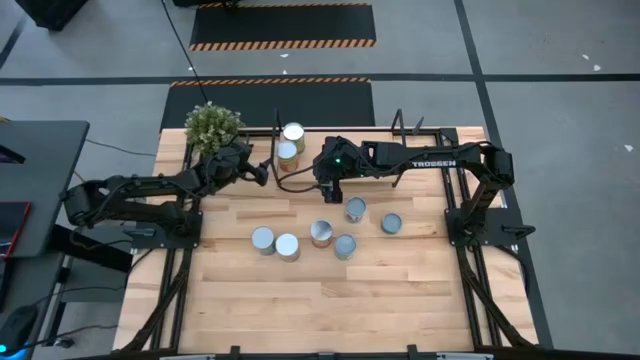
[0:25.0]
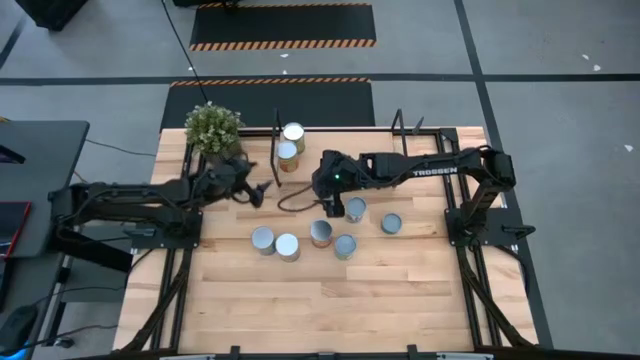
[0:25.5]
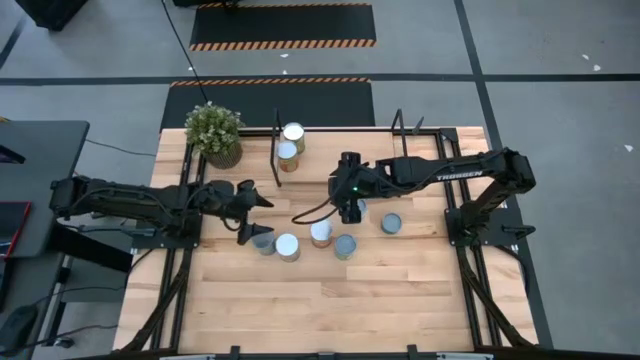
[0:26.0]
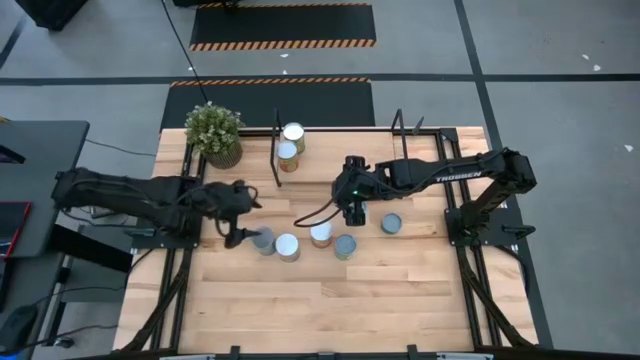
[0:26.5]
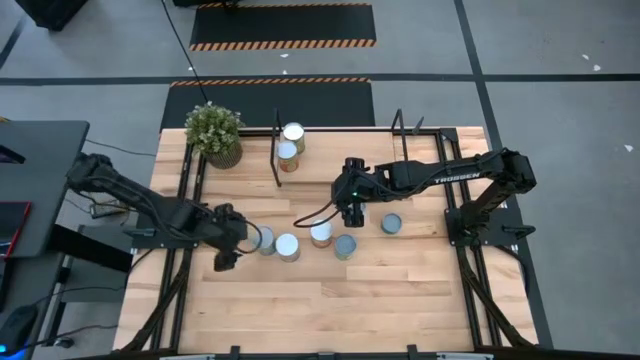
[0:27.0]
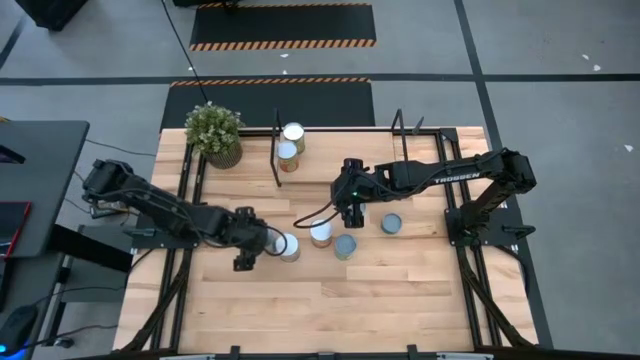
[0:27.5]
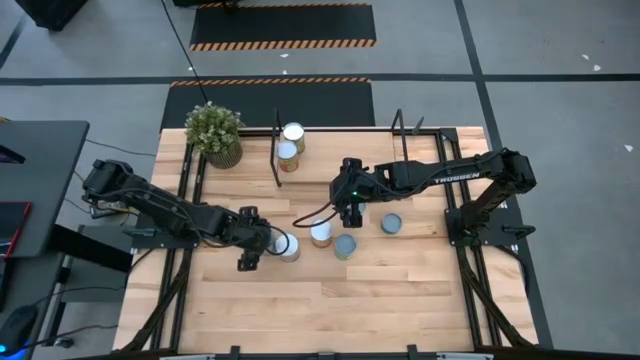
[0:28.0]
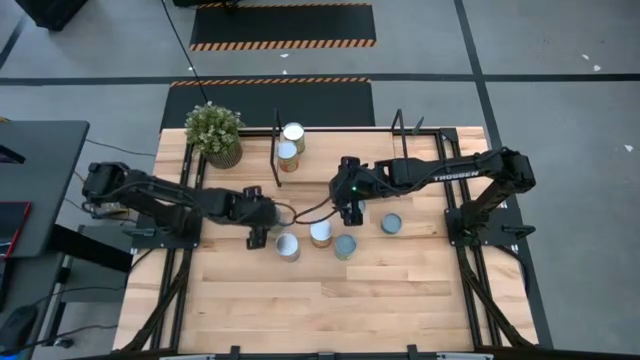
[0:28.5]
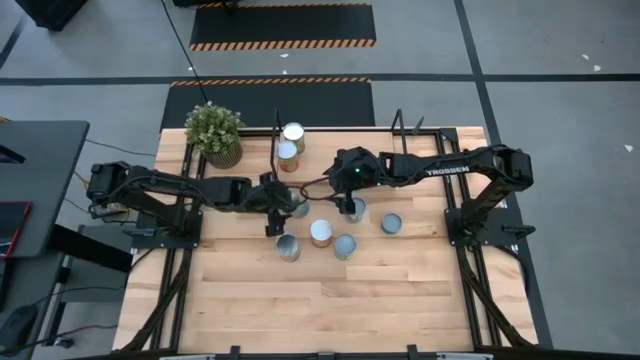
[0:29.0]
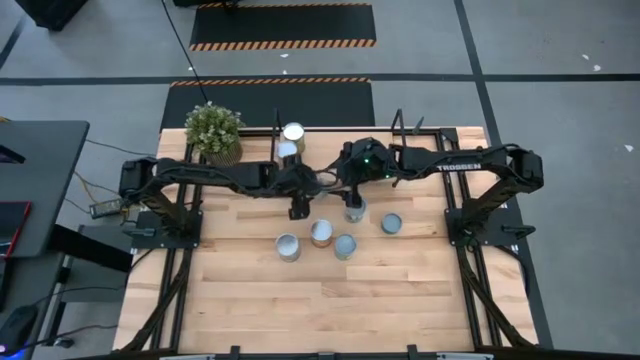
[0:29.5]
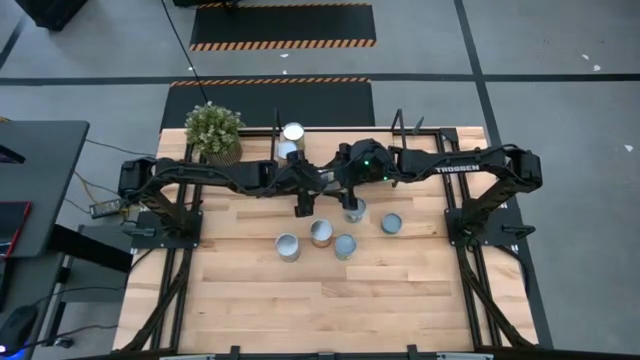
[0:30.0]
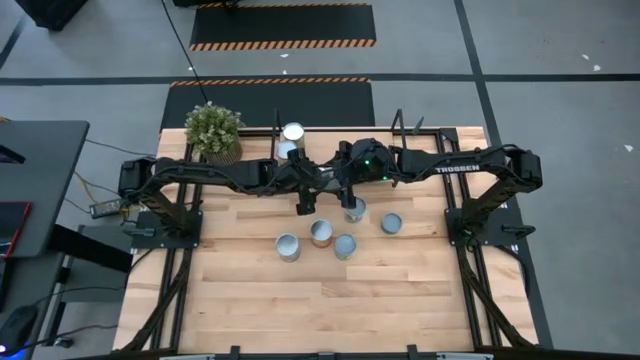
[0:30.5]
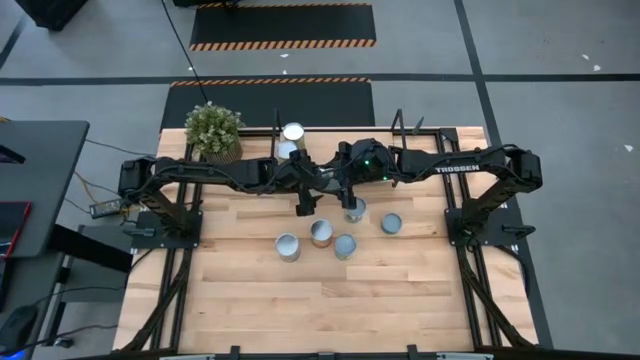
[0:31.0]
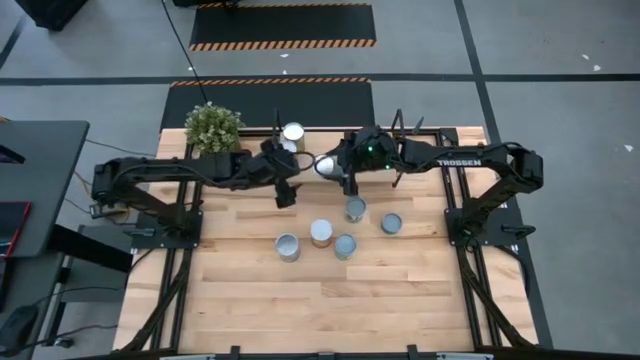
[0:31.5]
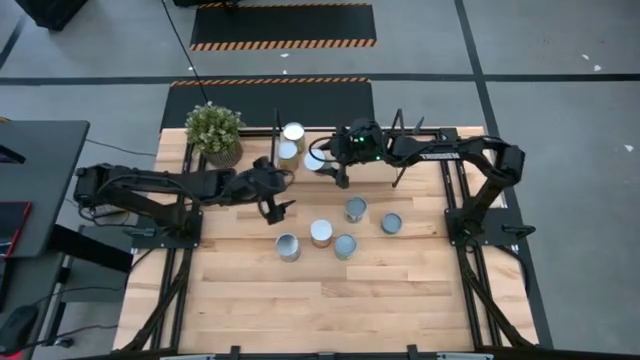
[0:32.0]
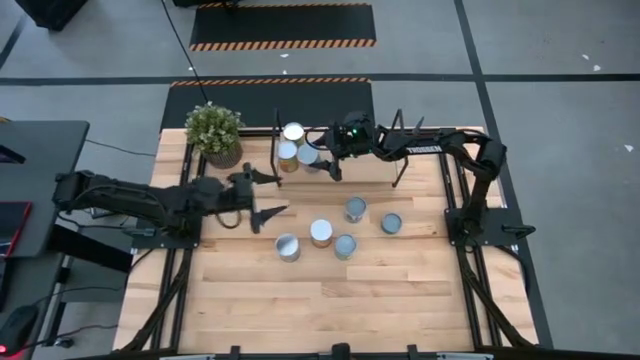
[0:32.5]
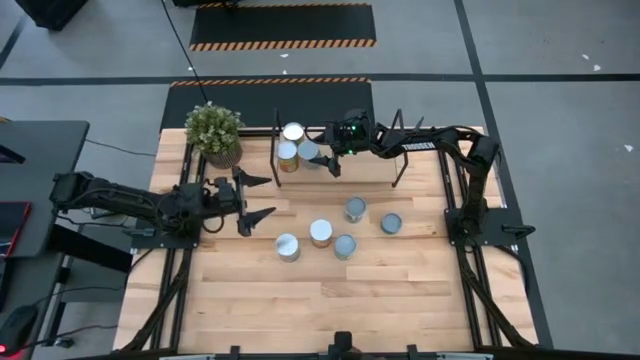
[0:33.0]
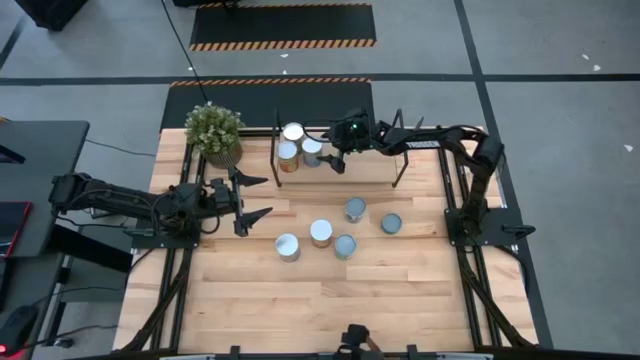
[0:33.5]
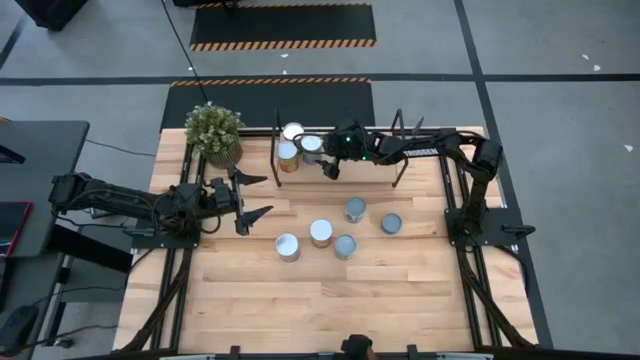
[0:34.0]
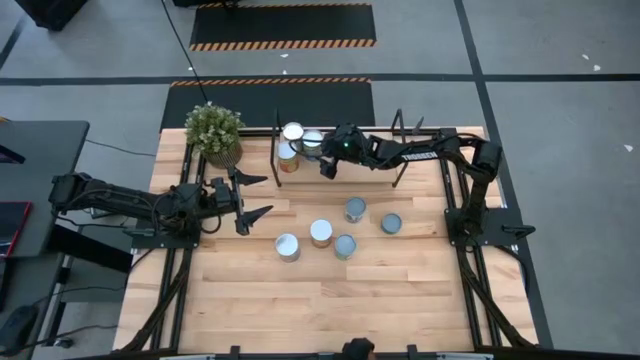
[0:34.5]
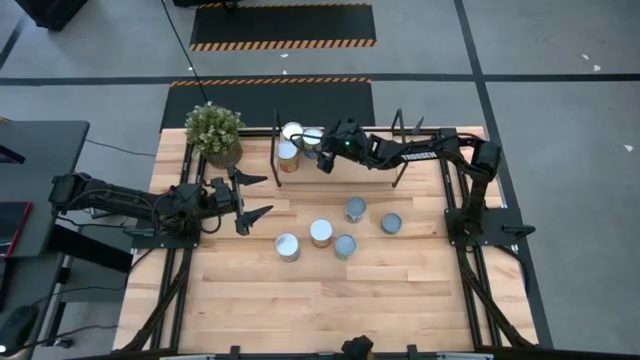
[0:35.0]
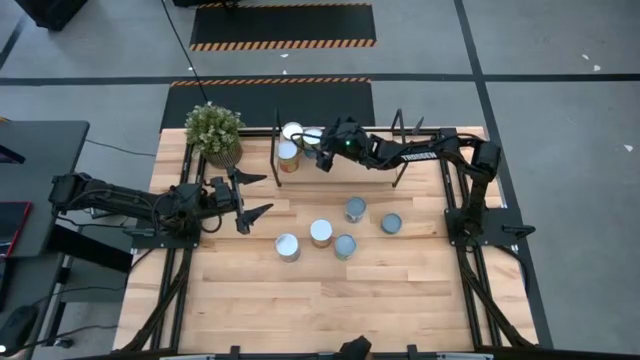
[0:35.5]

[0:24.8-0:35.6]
Task: Pick and place cans onto a shelf
Put the canned cherries on the shelf

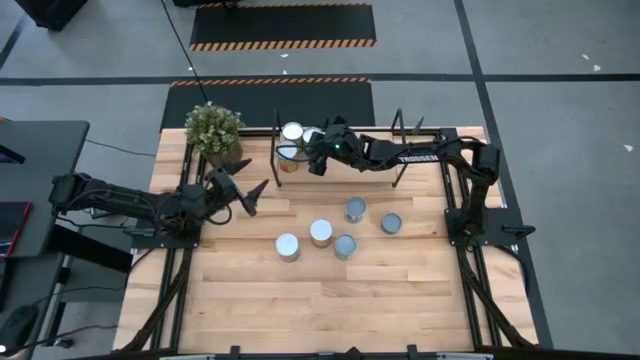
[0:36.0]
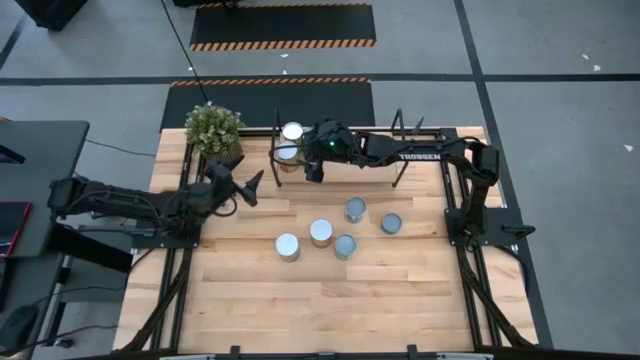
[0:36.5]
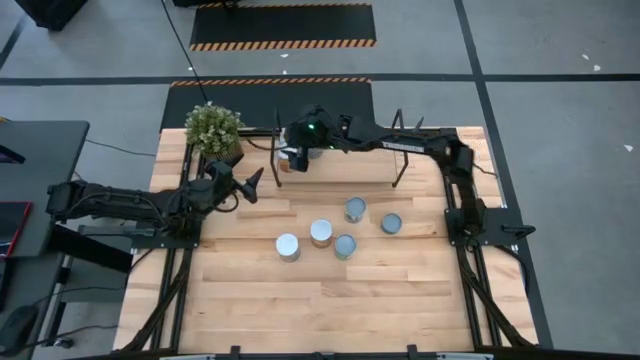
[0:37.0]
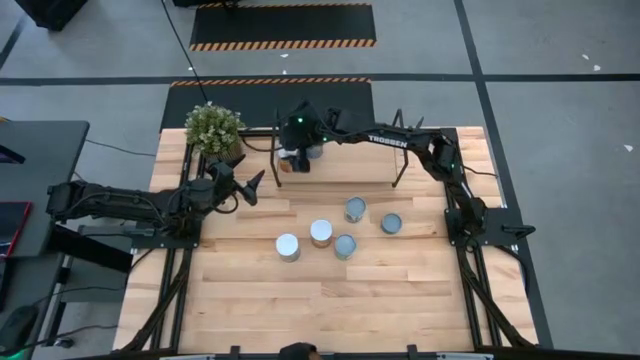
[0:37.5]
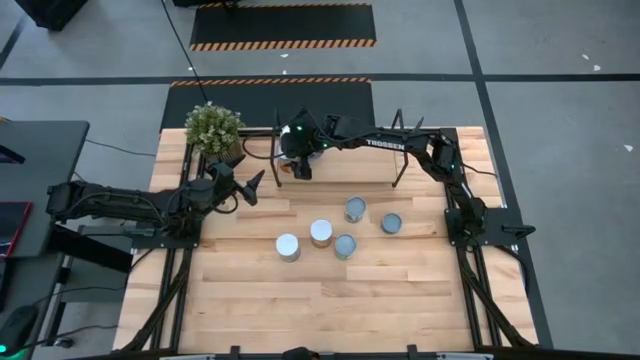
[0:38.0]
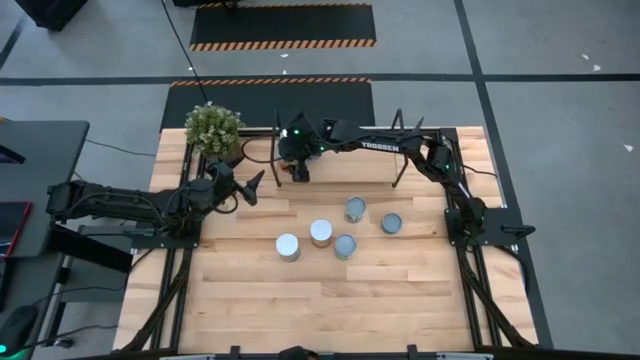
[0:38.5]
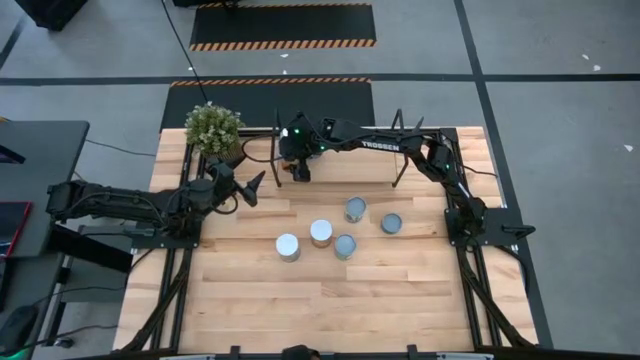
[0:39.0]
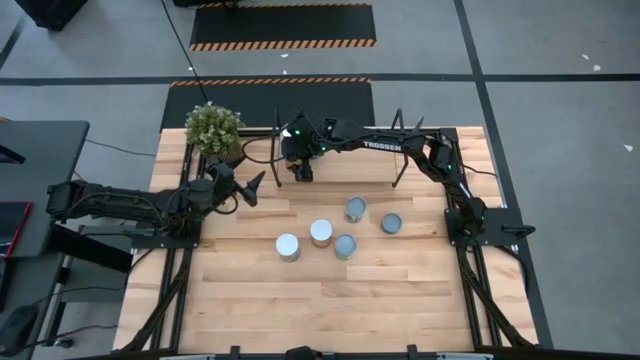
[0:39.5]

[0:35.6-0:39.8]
Adjust the canned pineapple on the shelf

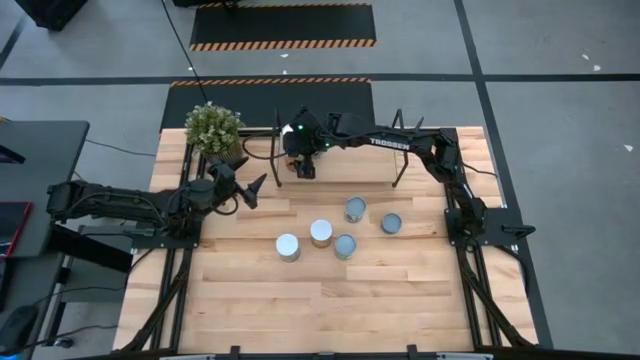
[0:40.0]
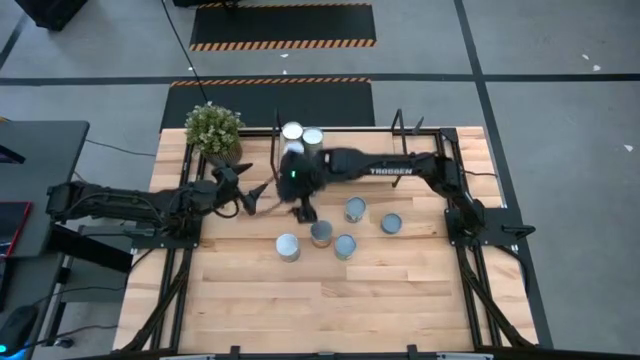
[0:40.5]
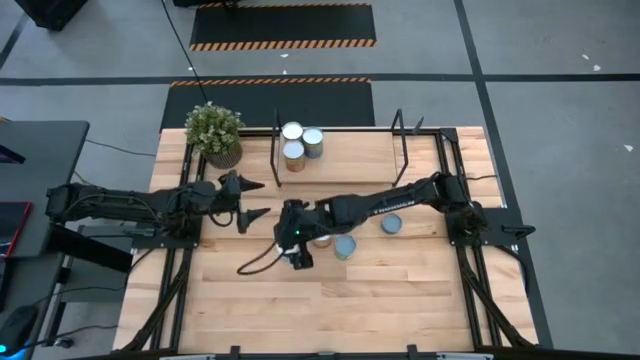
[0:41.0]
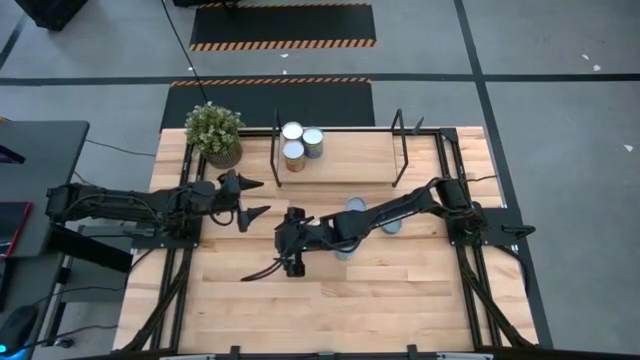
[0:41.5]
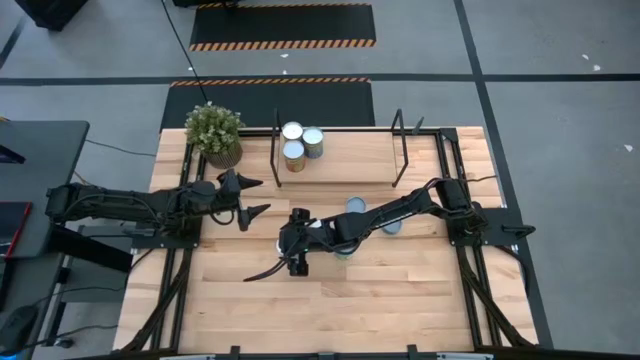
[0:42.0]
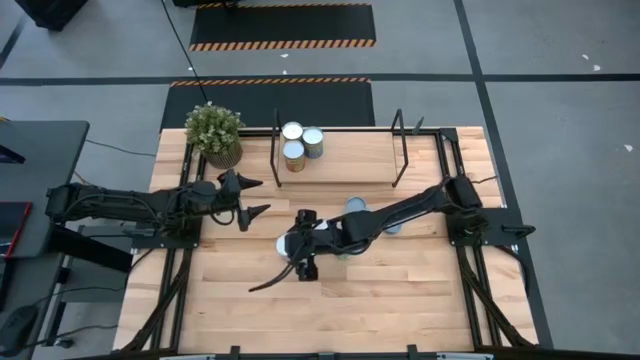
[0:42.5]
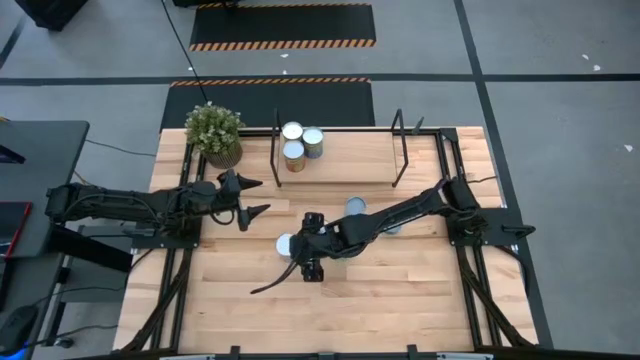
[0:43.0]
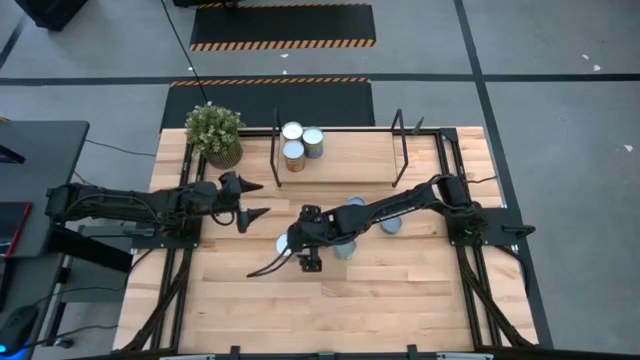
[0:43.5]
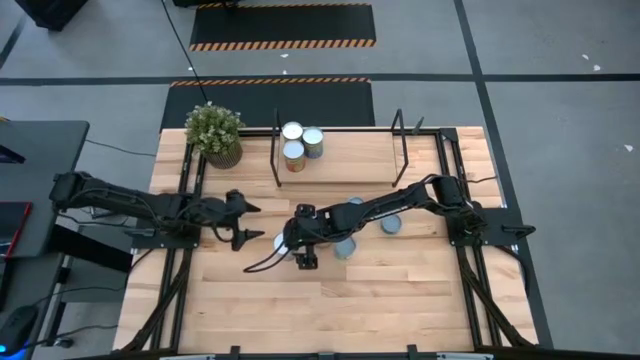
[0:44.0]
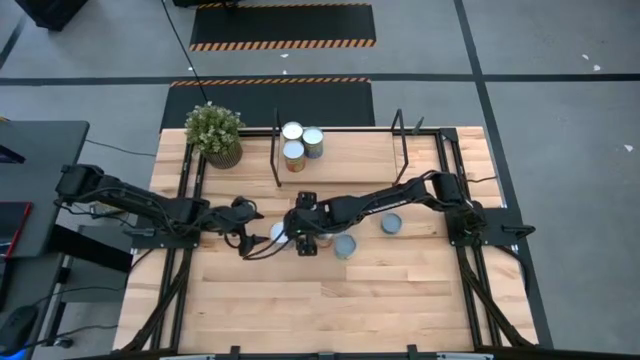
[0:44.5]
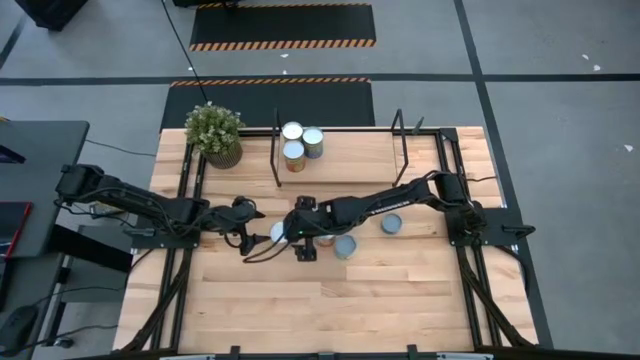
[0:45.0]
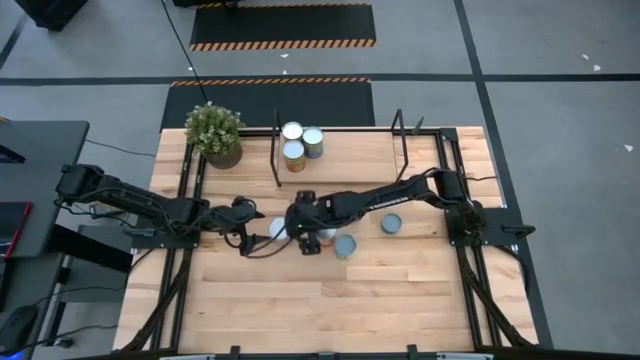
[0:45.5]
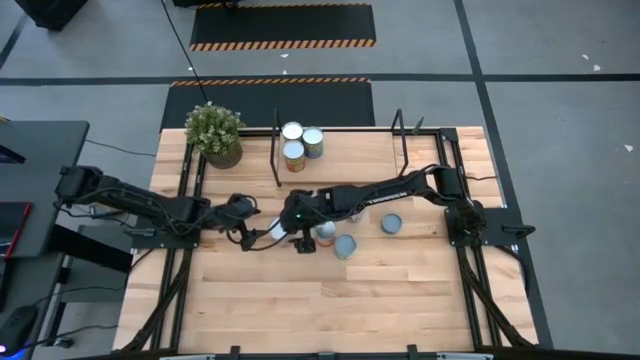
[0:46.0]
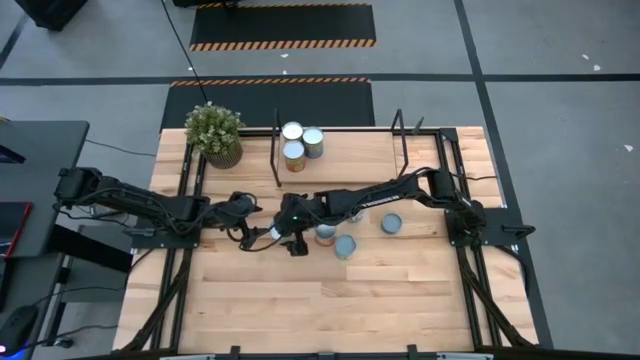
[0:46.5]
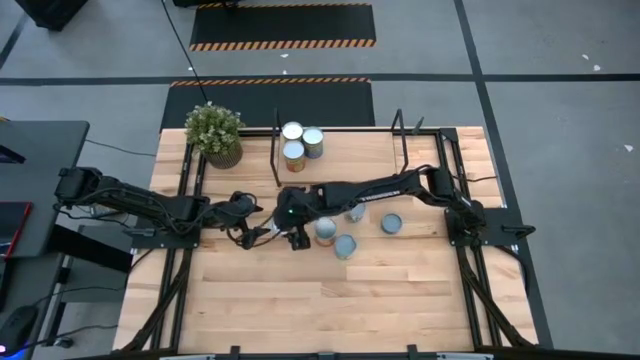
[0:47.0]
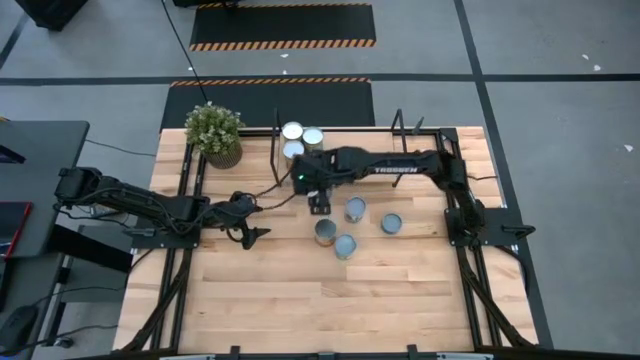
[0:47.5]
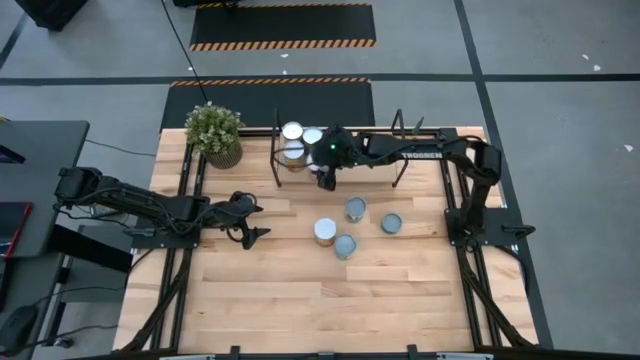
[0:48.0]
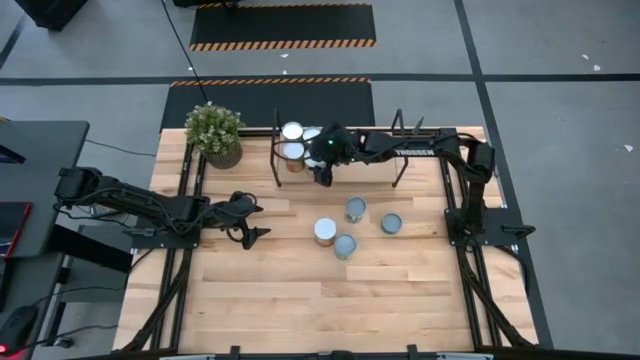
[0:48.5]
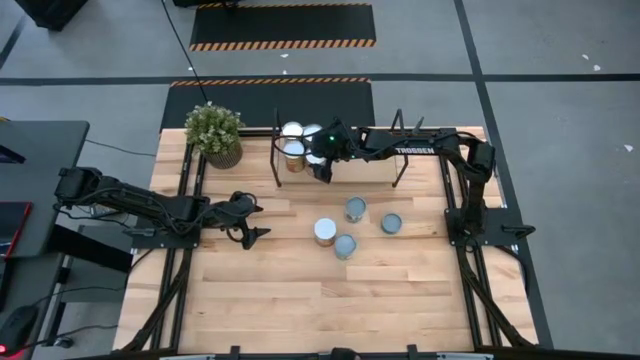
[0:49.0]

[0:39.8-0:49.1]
Put the canned peaches on the shelf
